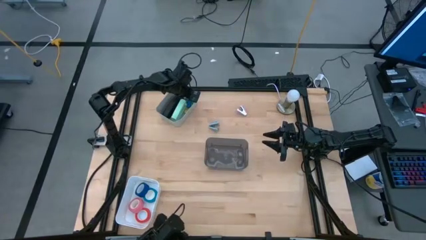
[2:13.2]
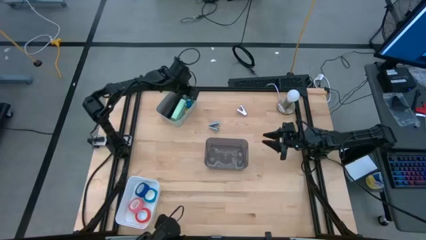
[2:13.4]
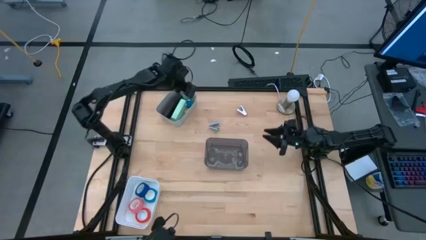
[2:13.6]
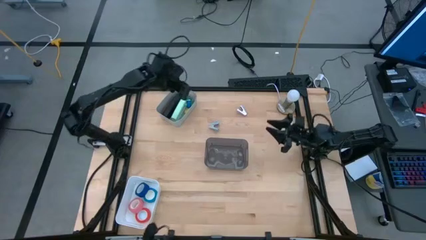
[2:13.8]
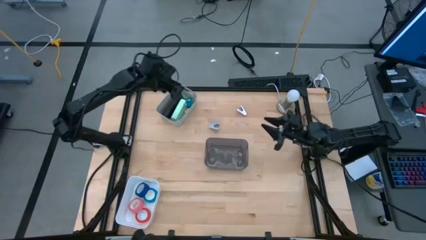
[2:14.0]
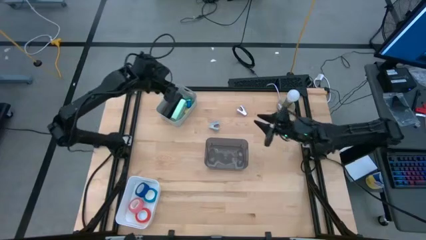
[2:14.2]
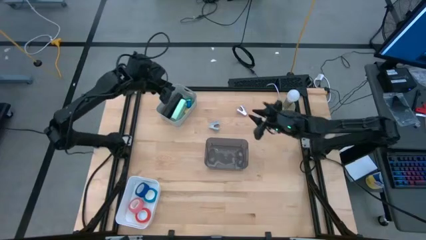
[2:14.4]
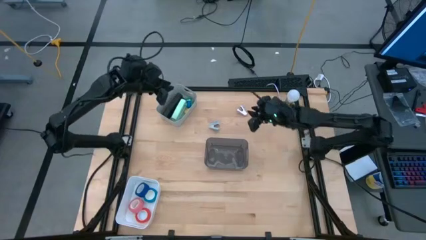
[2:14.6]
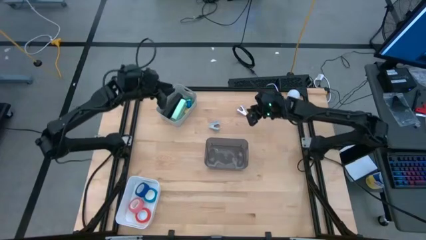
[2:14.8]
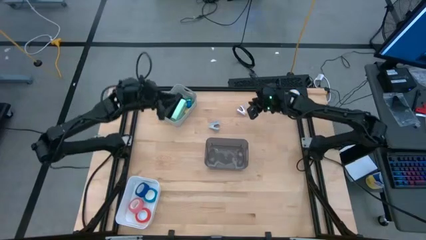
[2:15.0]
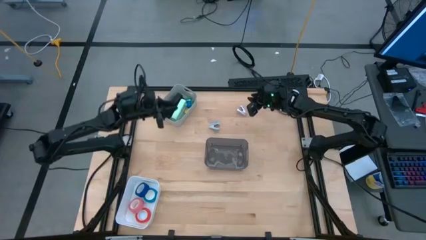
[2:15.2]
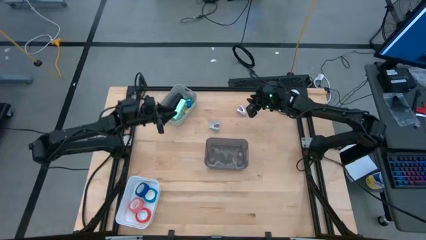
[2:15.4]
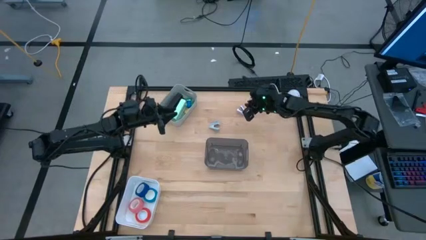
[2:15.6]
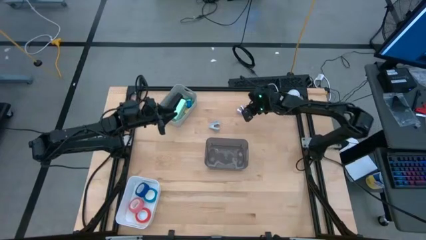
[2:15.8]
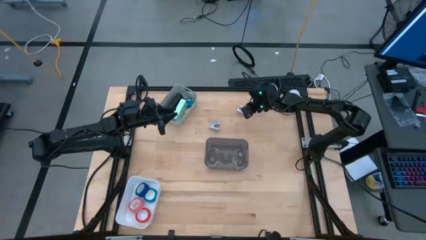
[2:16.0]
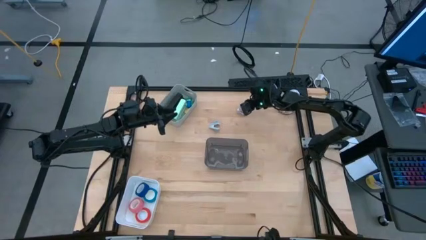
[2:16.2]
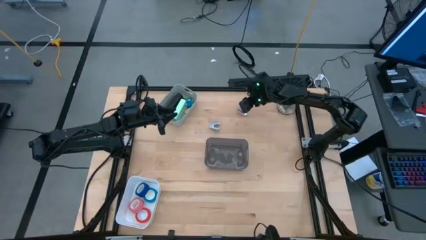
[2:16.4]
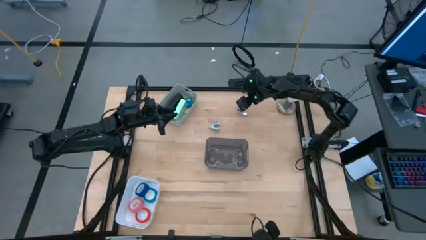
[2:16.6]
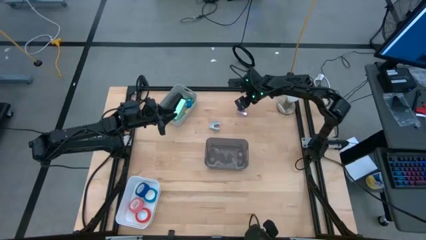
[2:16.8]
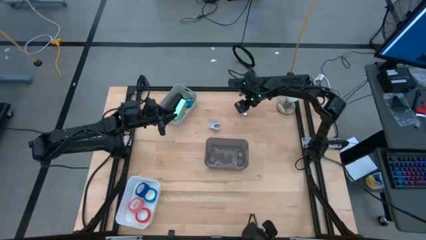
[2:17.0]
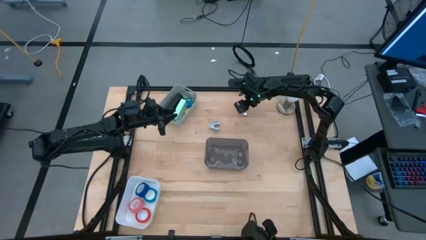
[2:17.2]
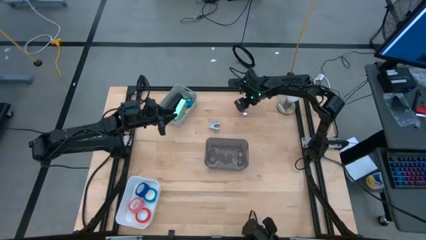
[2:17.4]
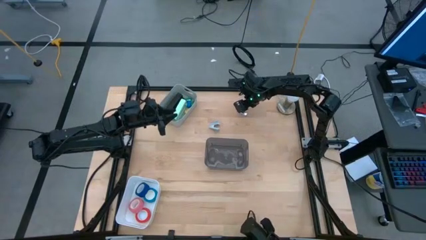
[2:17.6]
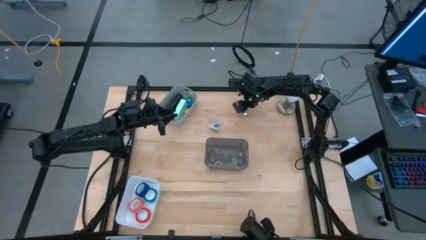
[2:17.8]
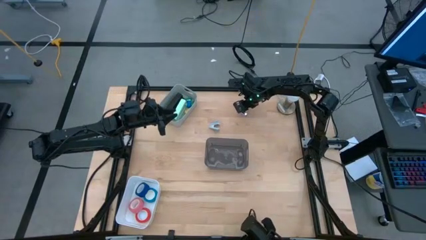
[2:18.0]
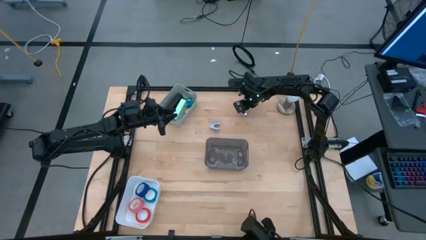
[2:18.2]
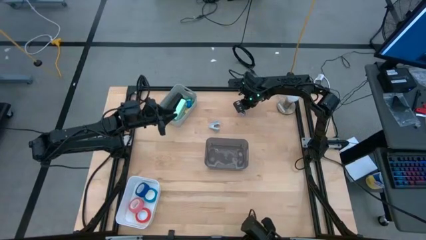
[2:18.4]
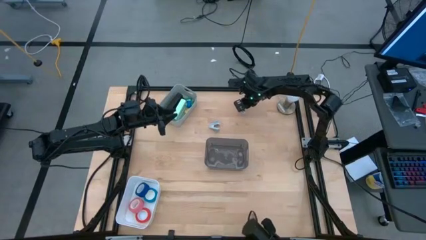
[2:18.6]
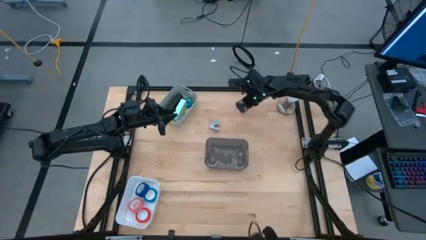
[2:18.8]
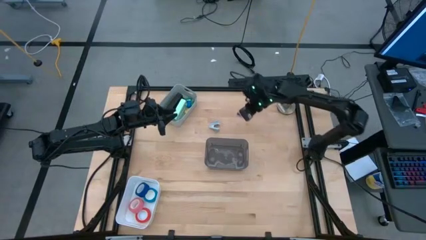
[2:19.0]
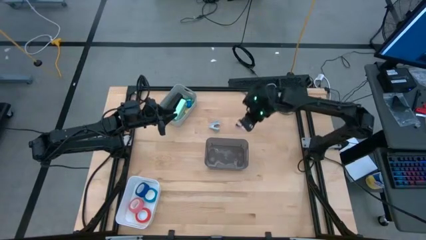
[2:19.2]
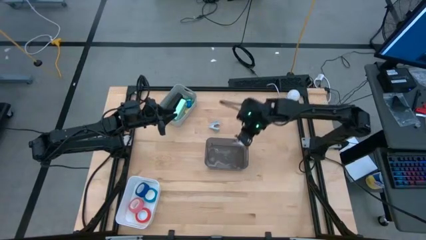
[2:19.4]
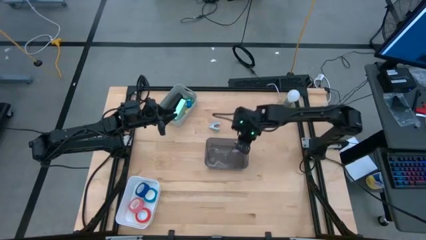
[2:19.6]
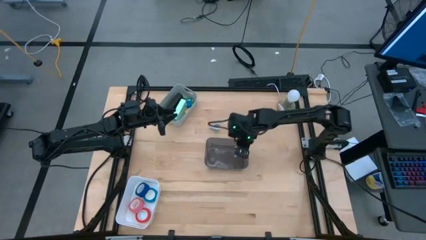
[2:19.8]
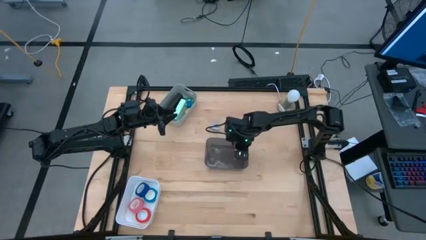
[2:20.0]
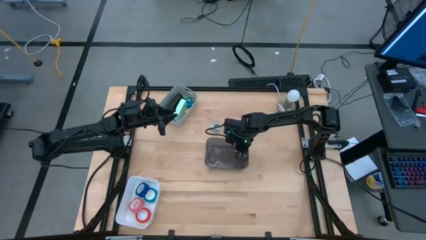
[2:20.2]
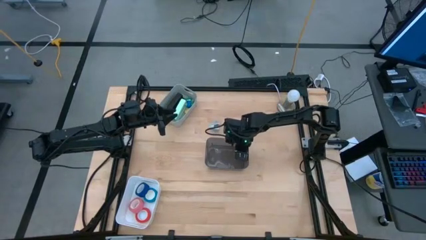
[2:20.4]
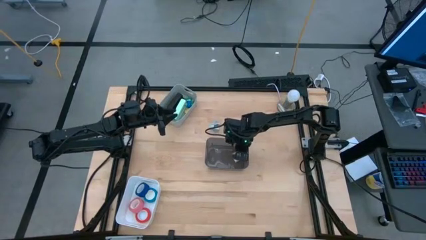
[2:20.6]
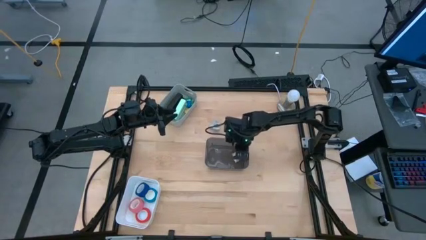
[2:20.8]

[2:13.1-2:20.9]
Task: Pick and place Stapler, Stapler remover, tape
Put the purple staple remover into the black bin

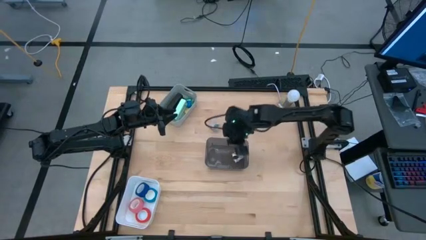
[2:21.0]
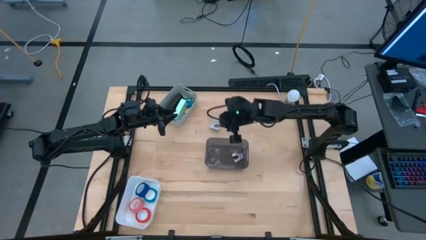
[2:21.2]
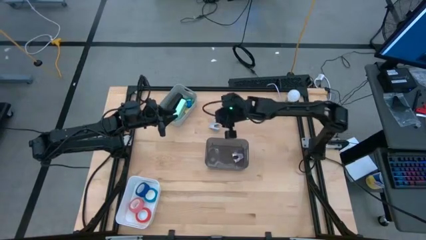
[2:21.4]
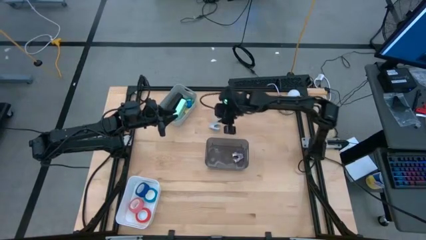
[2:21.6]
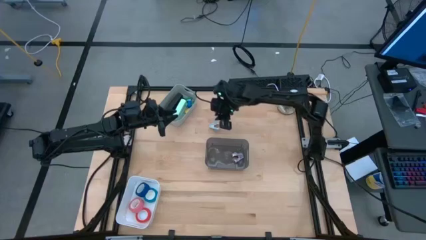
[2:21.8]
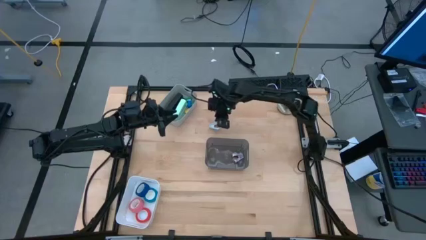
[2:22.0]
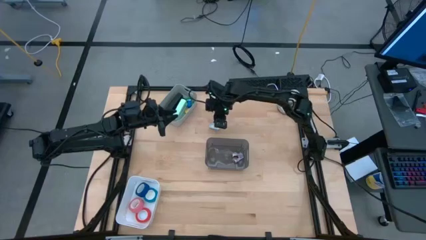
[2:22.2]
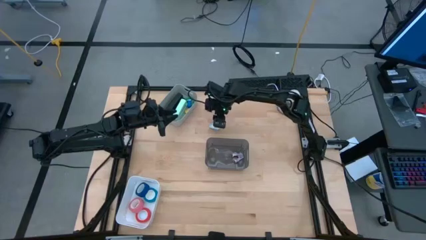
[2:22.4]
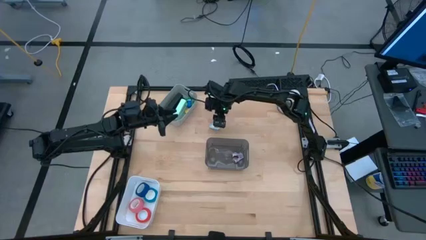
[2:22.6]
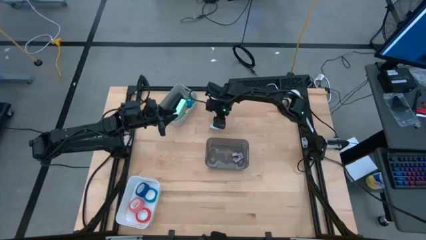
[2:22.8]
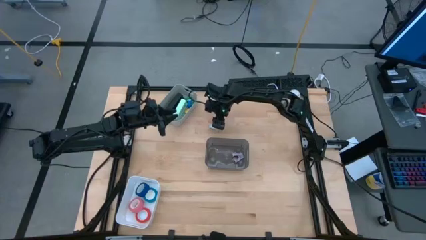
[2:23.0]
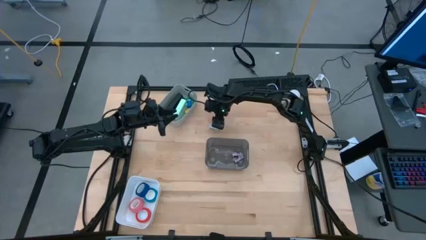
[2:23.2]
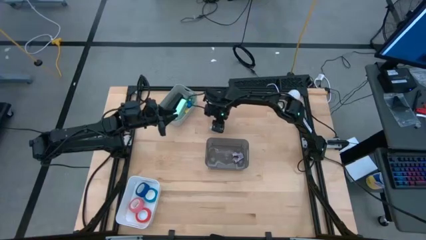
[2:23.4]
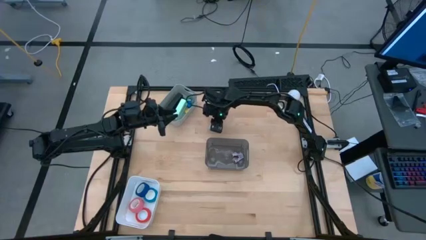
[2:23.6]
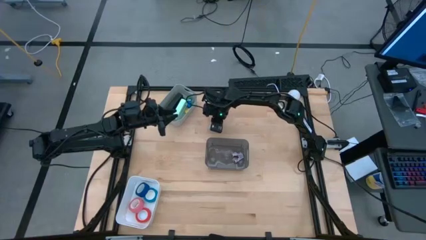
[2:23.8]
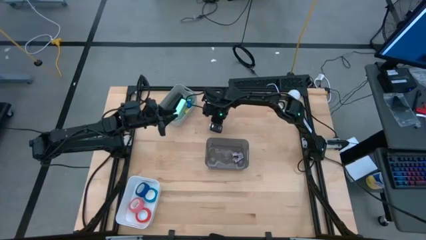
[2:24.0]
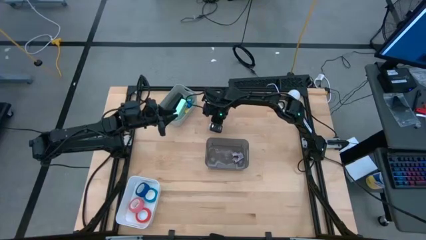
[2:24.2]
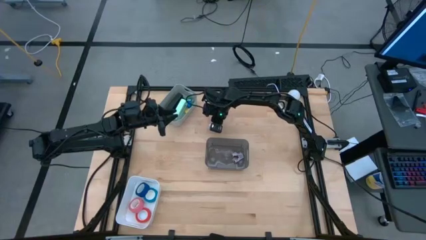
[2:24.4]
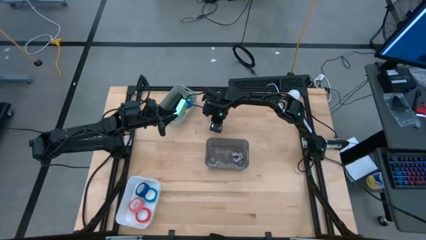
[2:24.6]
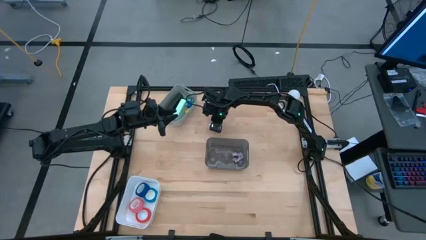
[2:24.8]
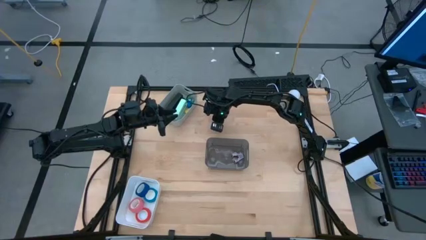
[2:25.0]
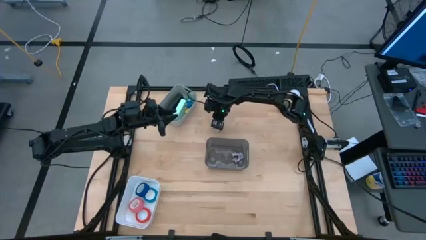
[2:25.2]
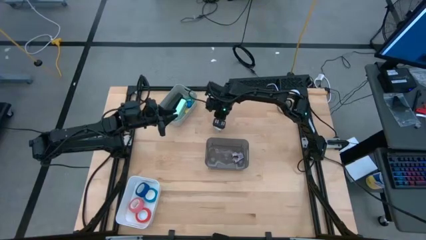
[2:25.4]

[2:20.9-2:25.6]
Put the blue staple remover into the black bin

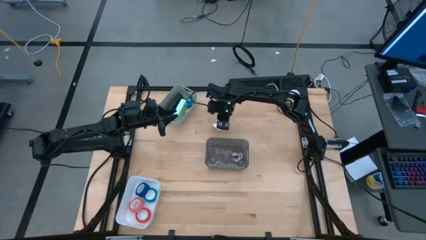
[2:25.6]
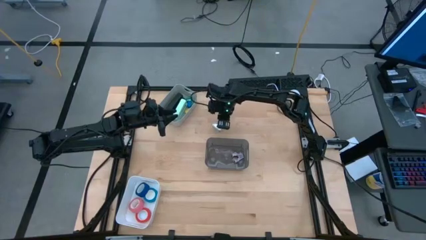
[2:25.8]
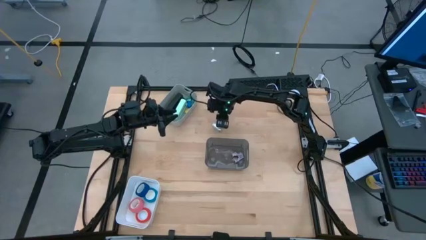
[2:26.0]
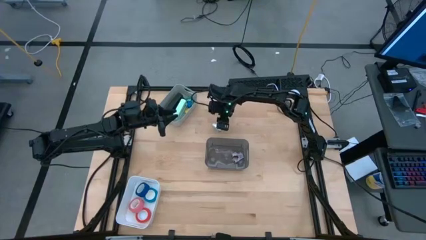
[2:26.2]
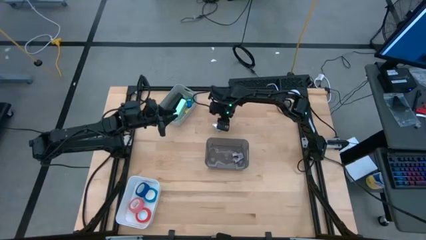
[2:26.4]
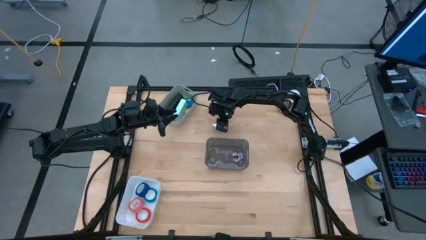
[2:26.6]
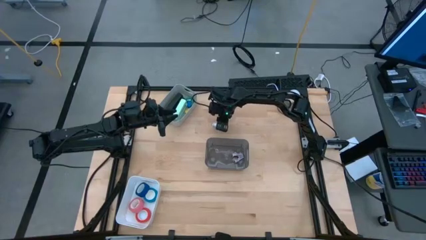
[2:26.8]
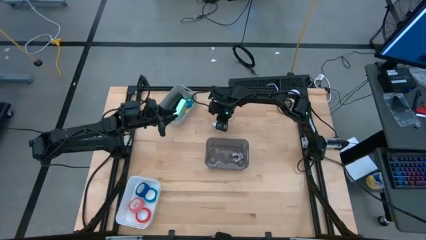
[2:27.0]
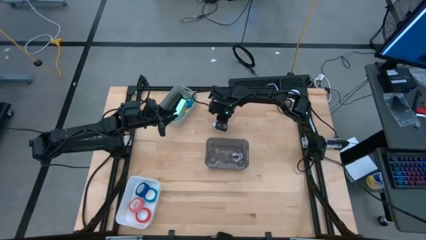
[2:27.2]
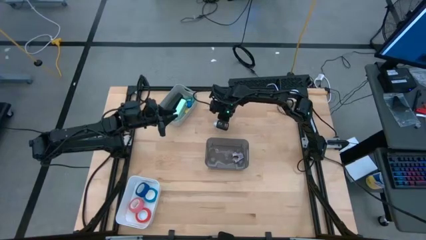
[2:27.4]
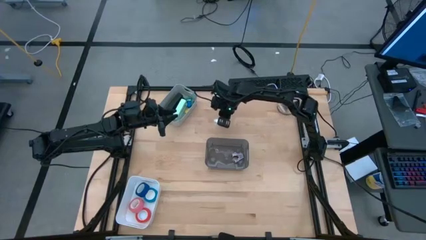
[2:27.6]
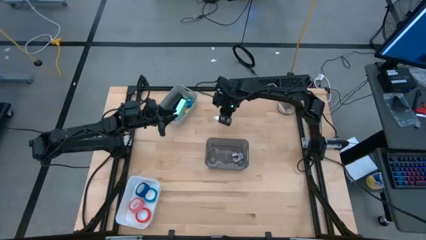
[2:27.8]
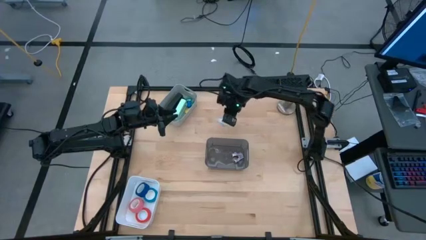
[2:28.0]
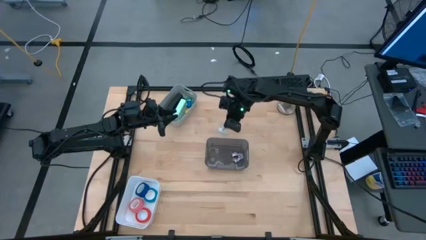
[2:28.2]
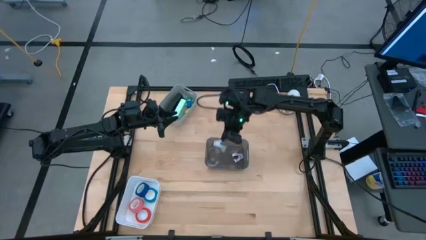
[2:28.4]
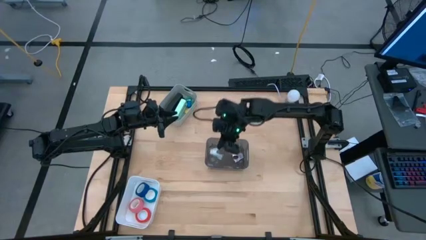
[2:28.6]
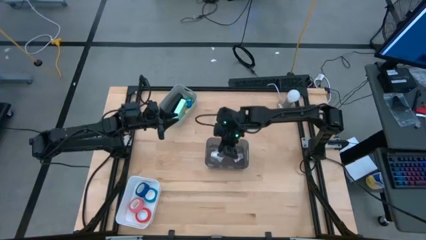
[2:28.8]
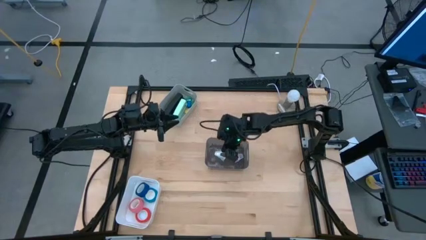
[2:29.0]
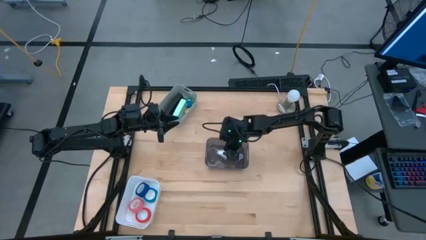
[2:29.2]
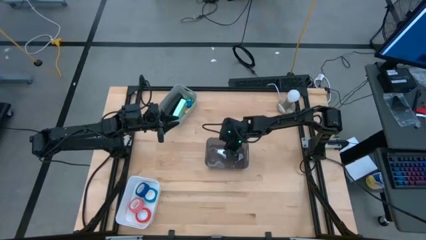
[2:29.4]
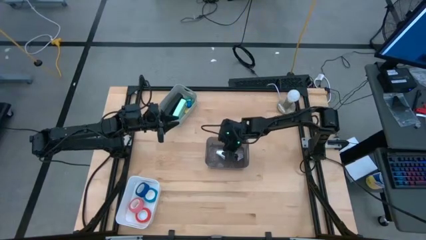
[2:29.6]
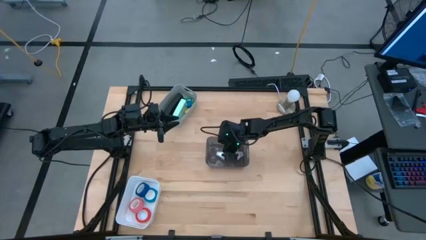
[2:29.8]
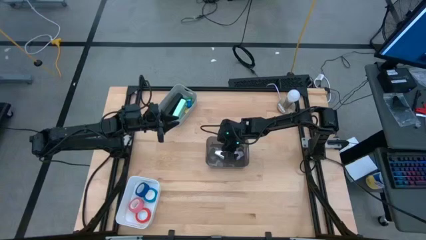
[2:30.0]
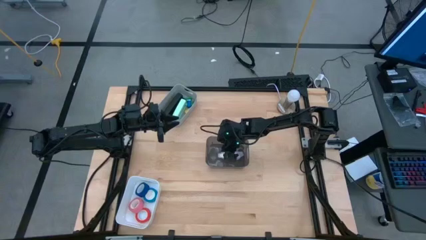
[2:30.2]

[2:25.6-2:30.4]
Put the blue staple remover into the black bin
